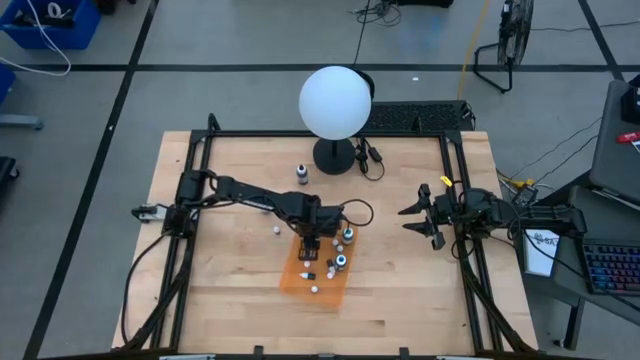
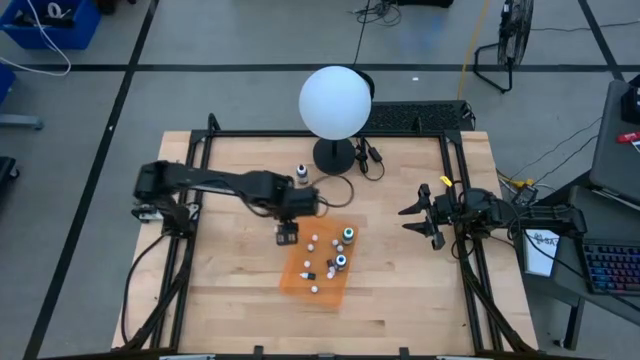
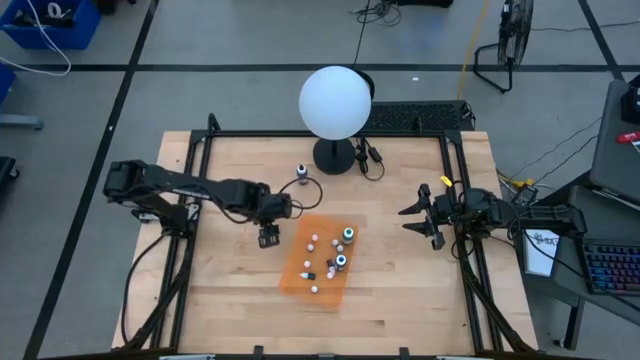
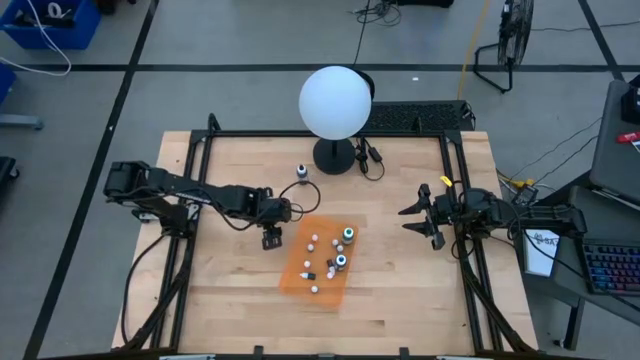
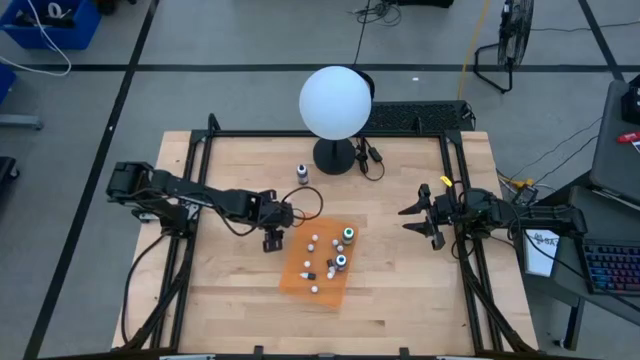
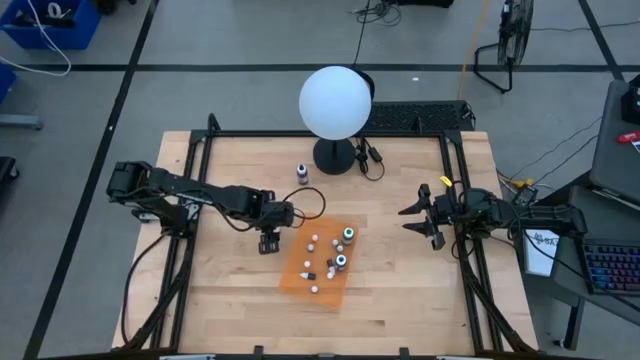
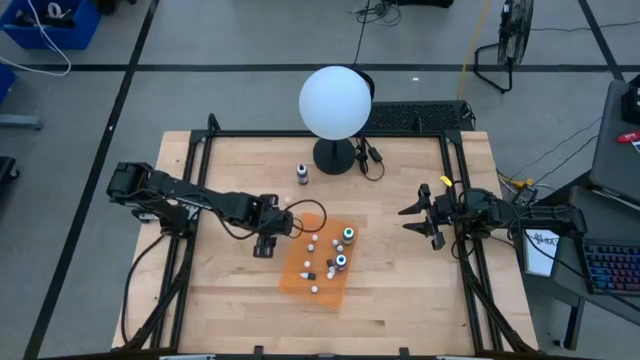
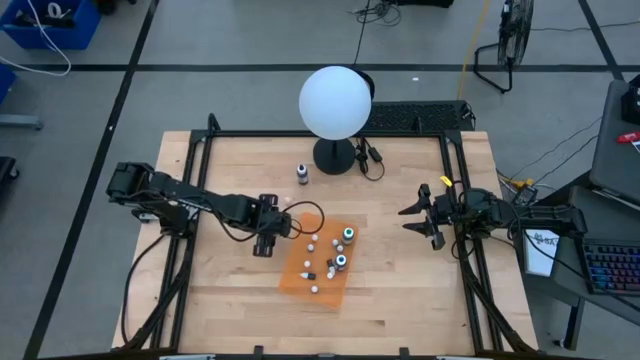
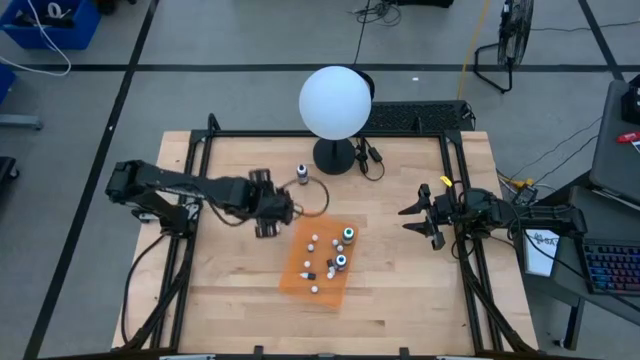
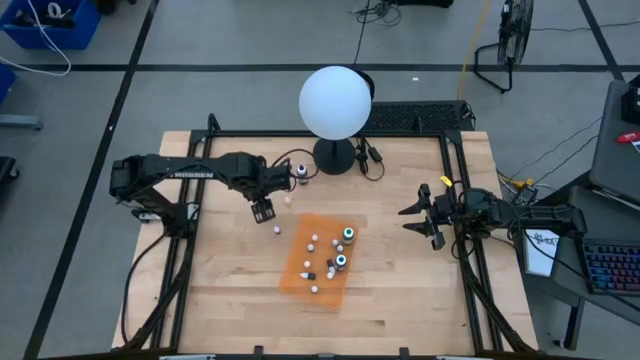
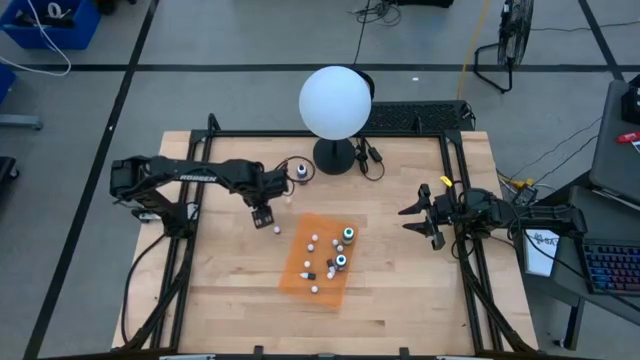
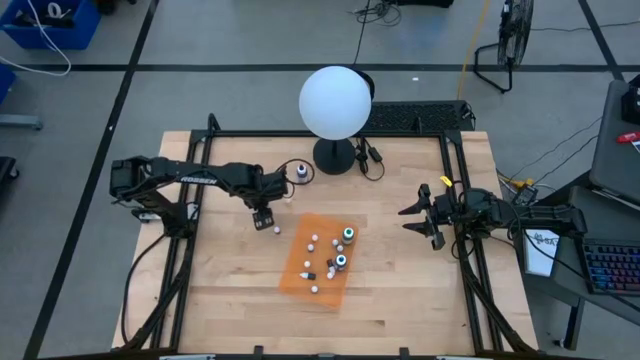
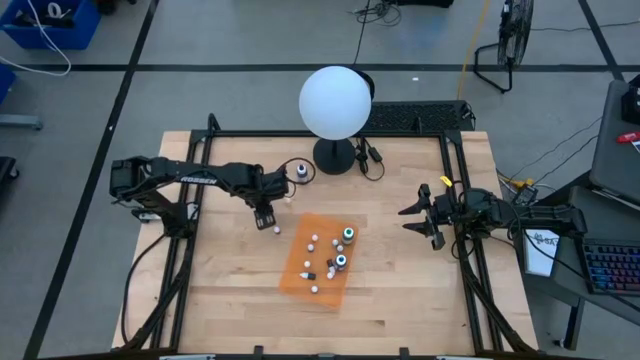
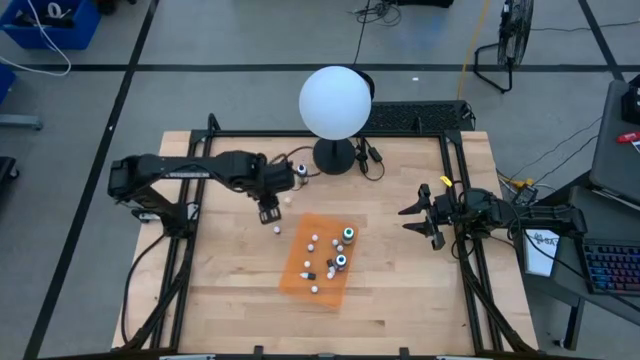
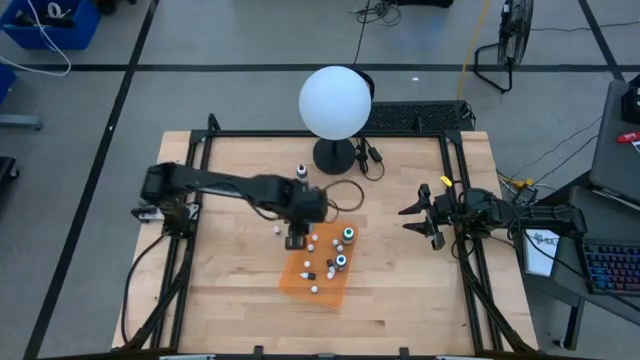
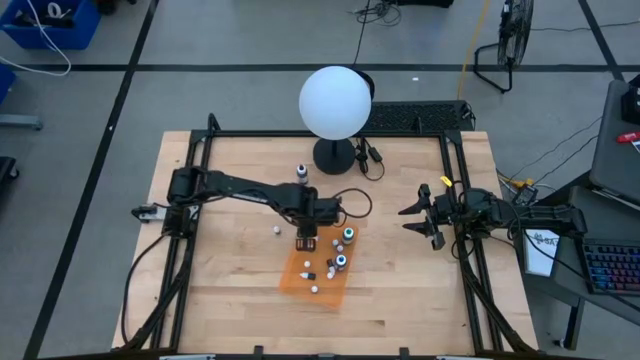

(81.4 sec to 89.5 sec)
Task: Pick & Place food coloring
Put the large purple food coloring bottle into the orange bin

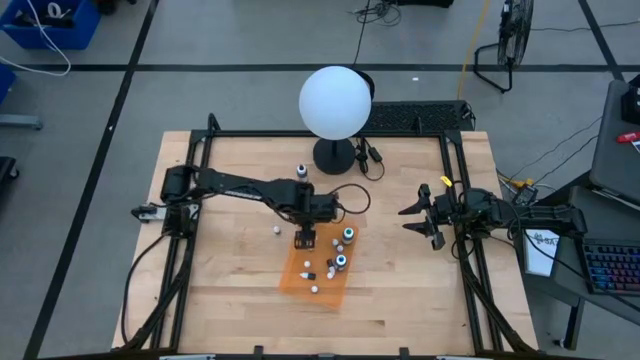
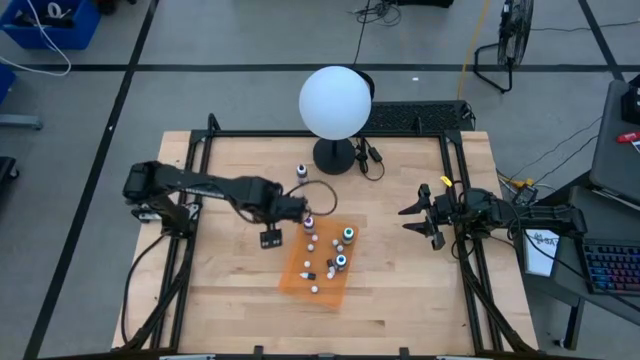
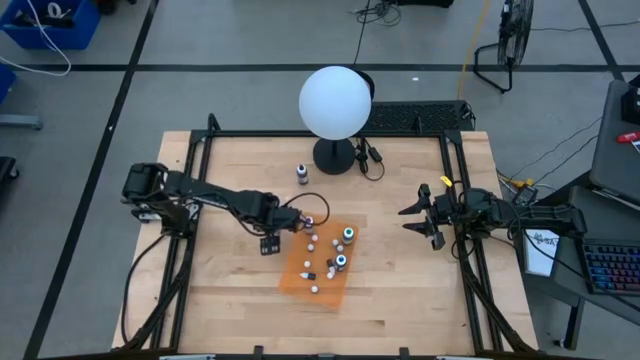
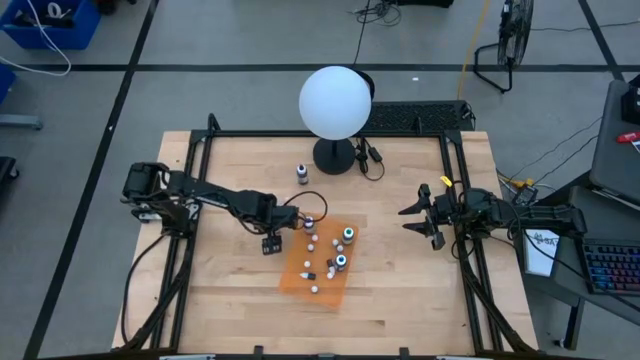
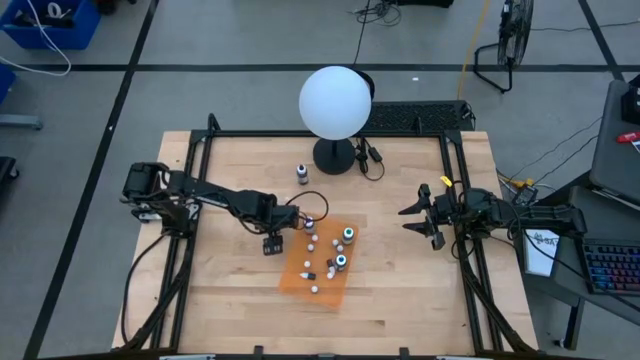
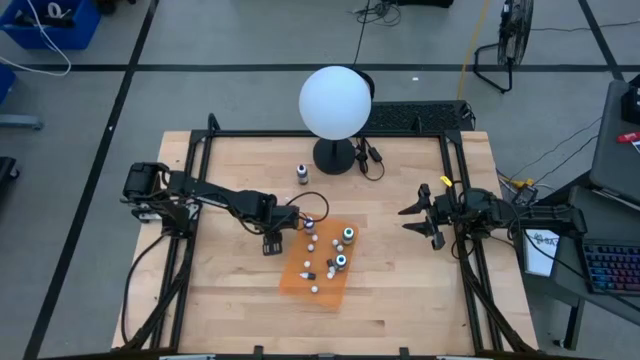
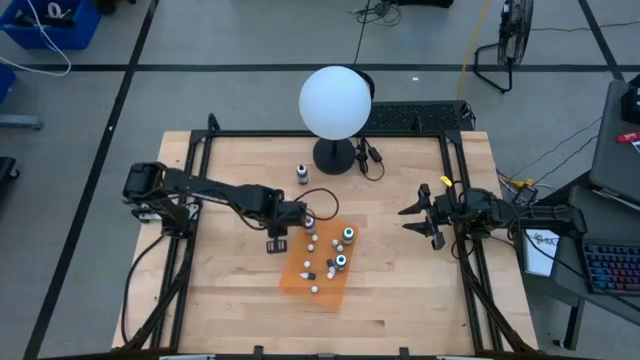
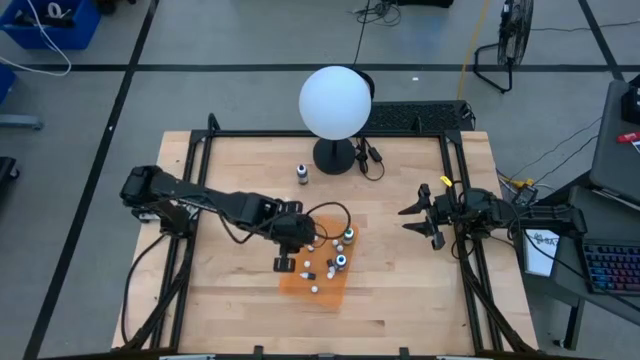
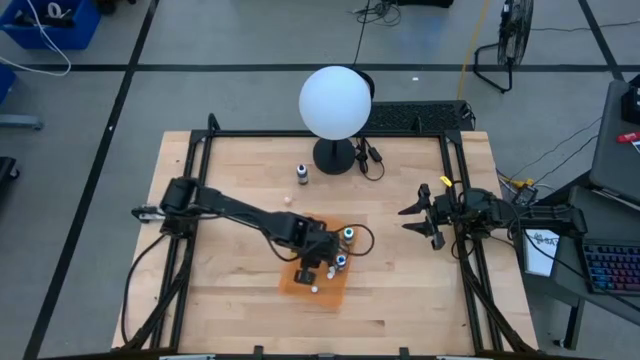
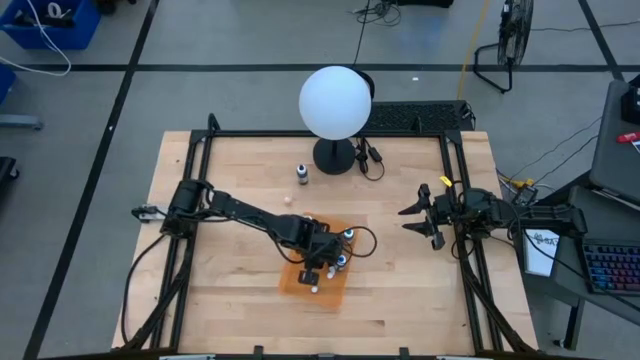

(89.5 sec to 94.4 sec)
Put the dark red food coloring bottle into the orange bin

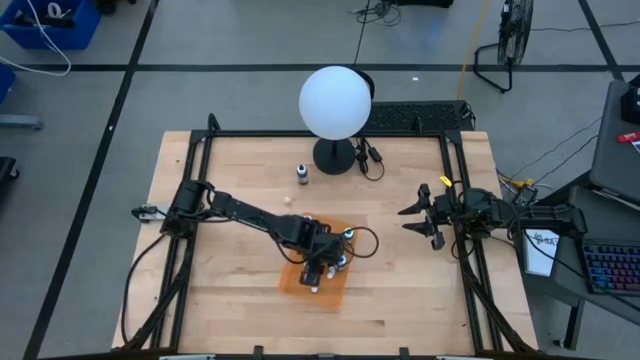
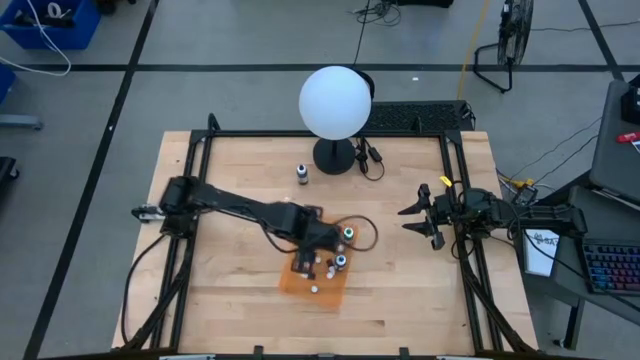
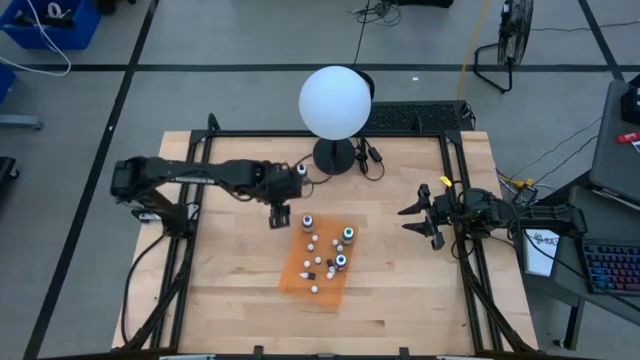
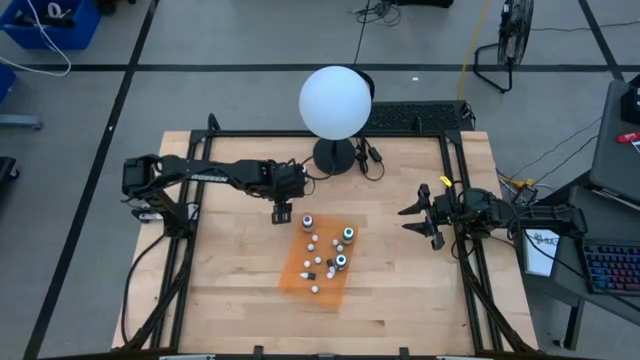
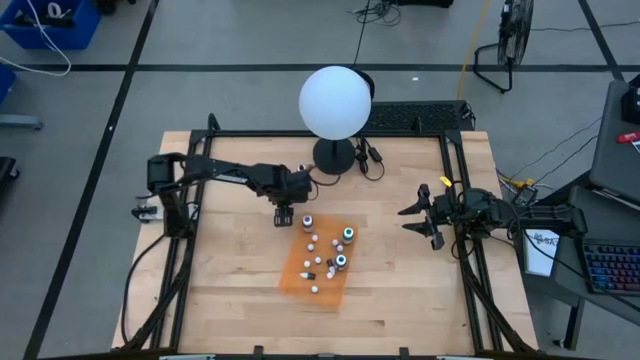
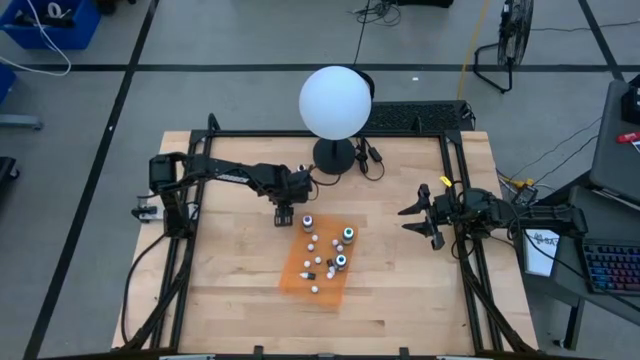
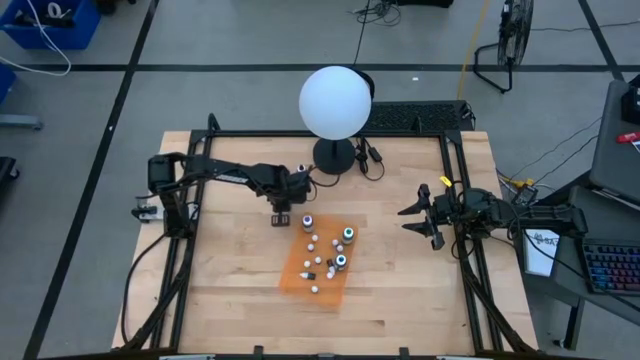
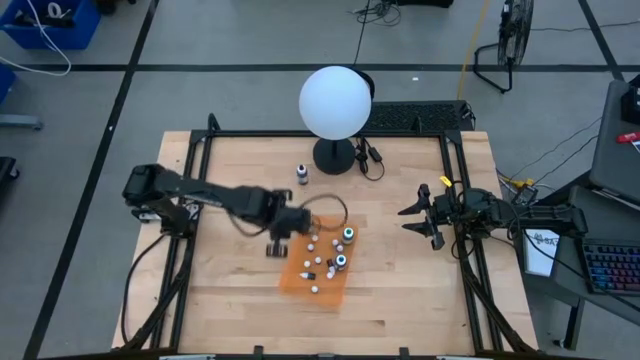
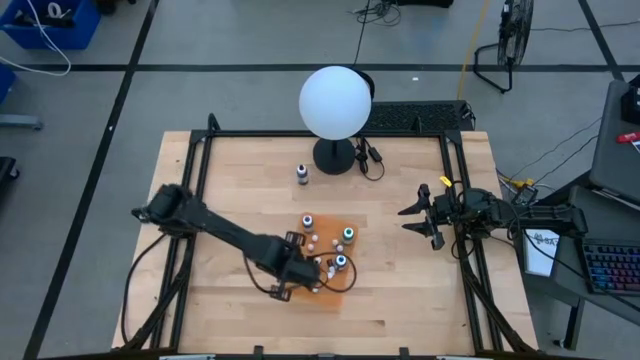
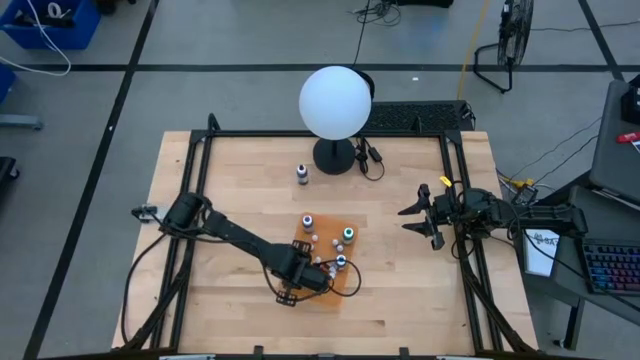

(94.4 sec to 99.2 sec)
Put the small orange food coloring bottle into the orange bin

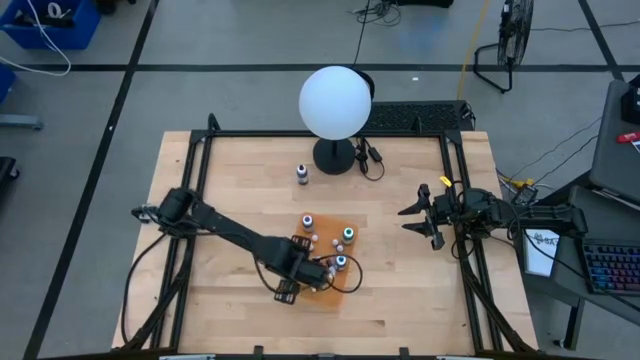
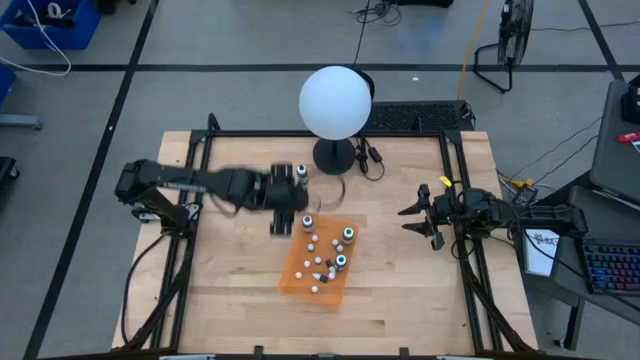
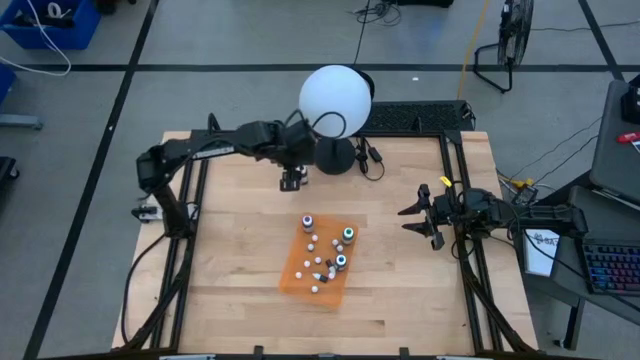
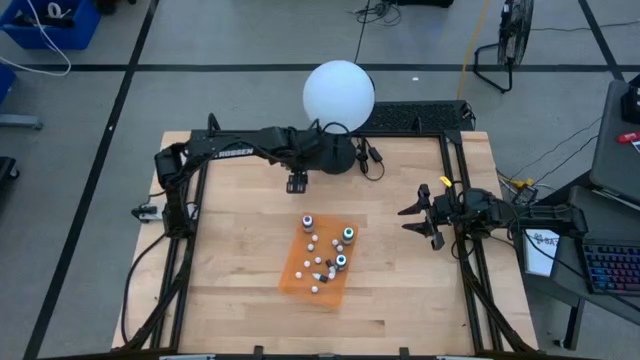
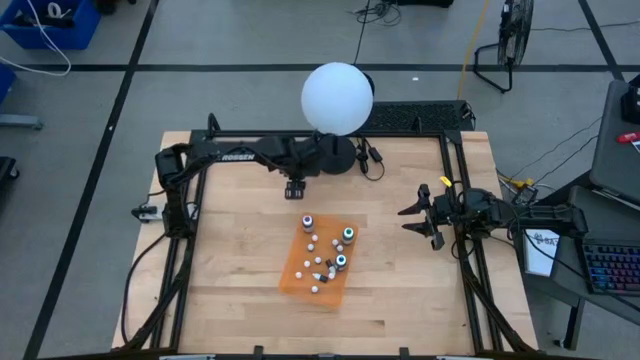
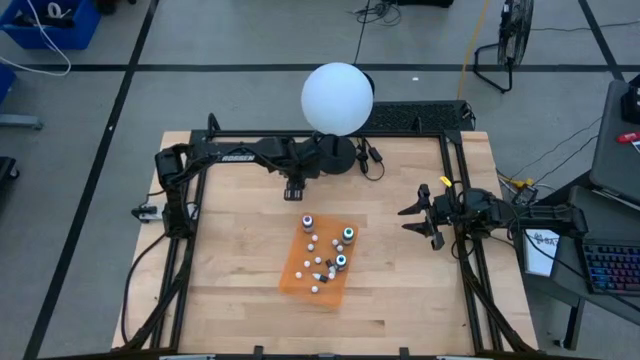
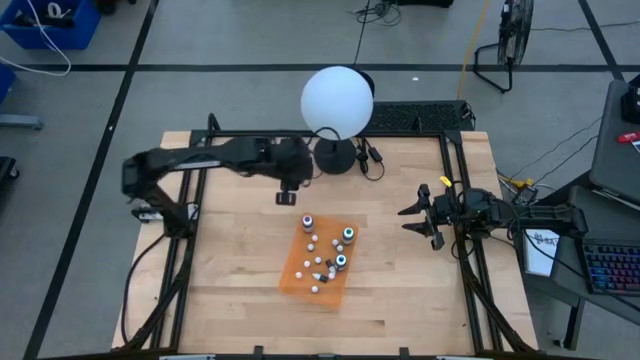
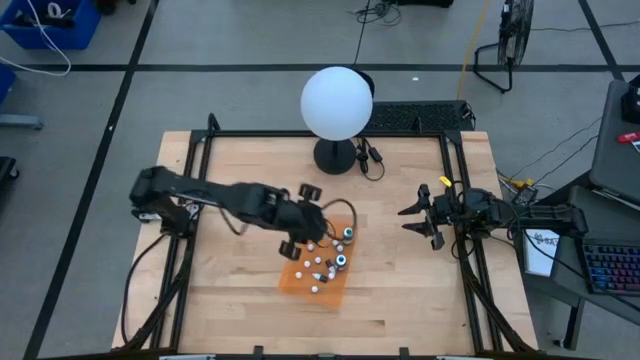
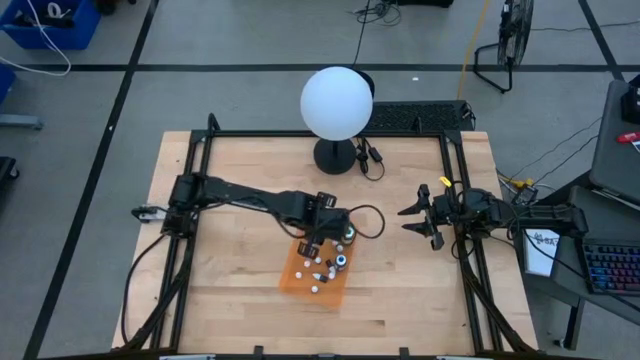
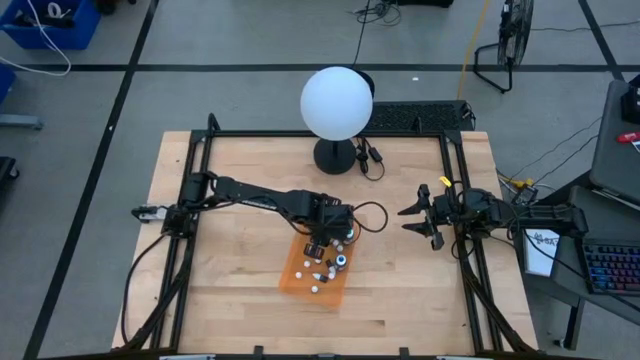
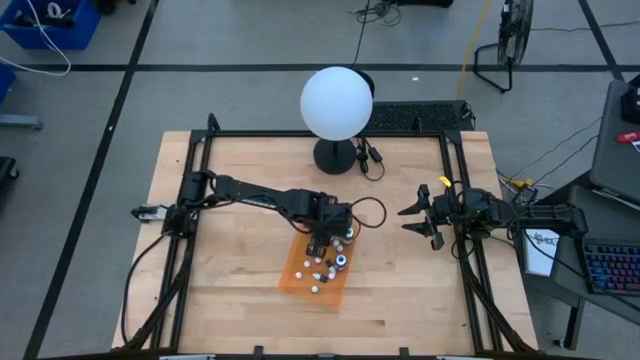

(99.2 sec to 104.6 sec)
Put the large black food coloring bottle into the orange bin
